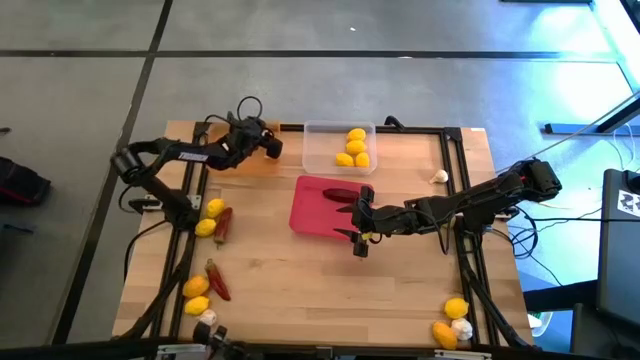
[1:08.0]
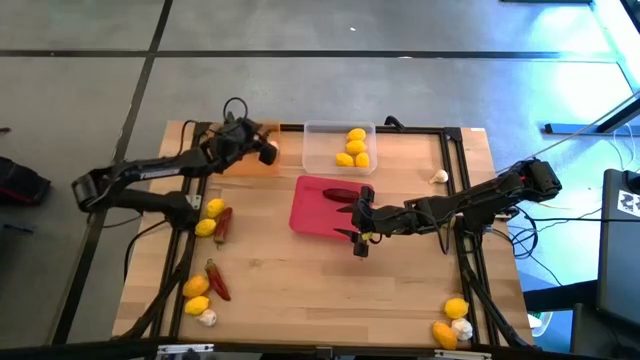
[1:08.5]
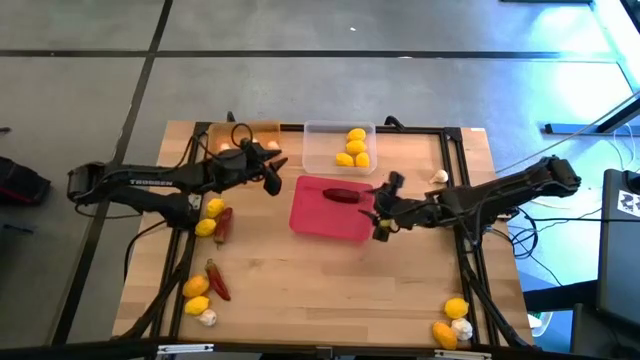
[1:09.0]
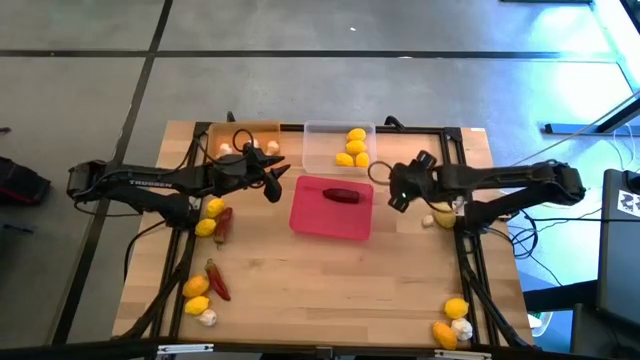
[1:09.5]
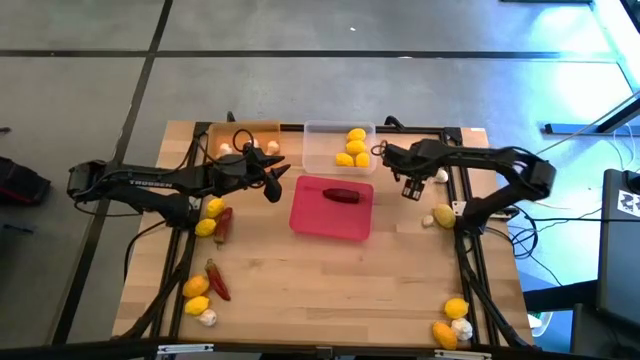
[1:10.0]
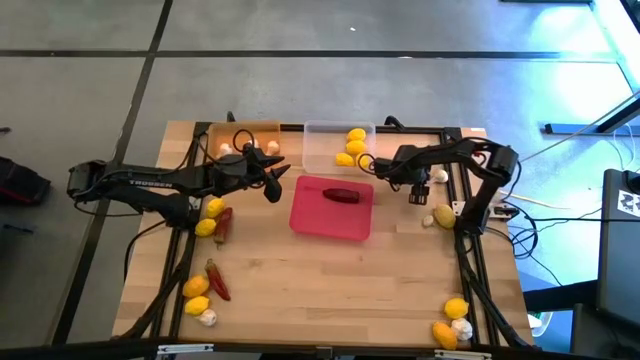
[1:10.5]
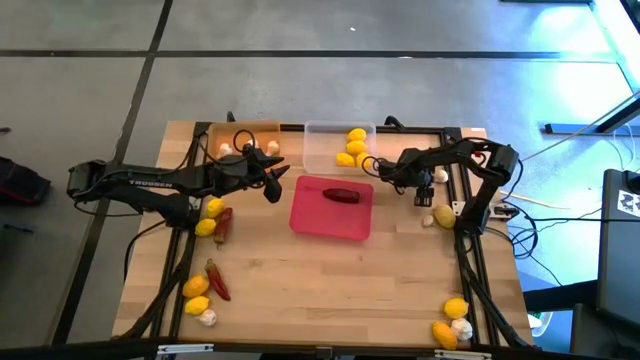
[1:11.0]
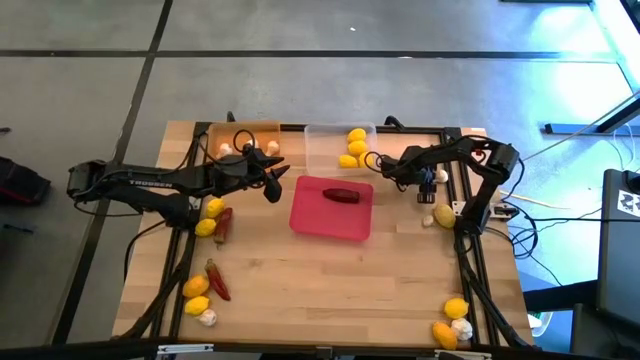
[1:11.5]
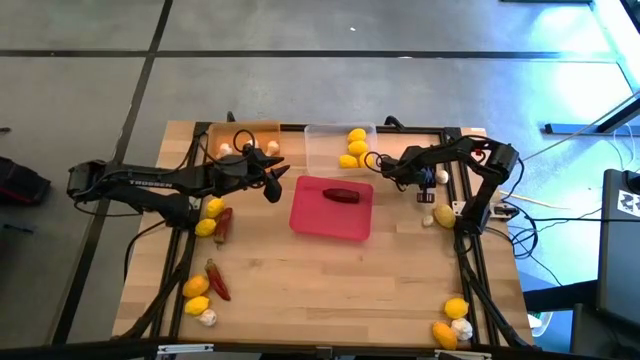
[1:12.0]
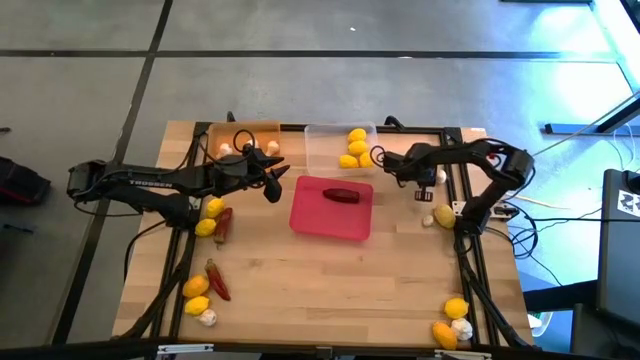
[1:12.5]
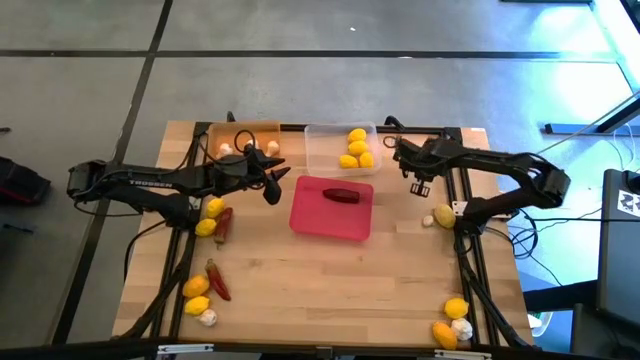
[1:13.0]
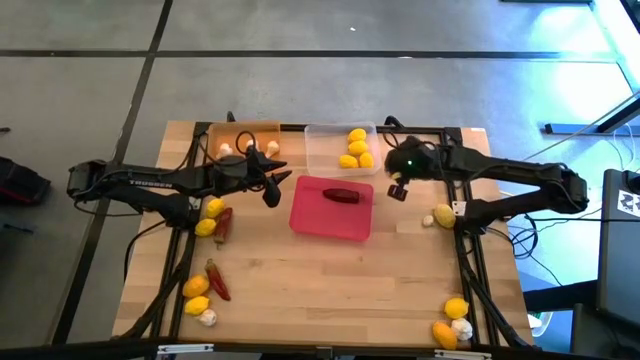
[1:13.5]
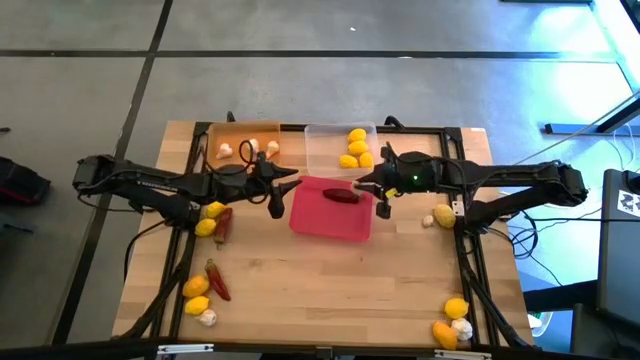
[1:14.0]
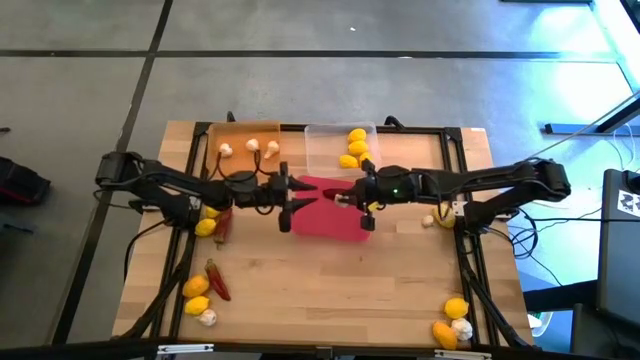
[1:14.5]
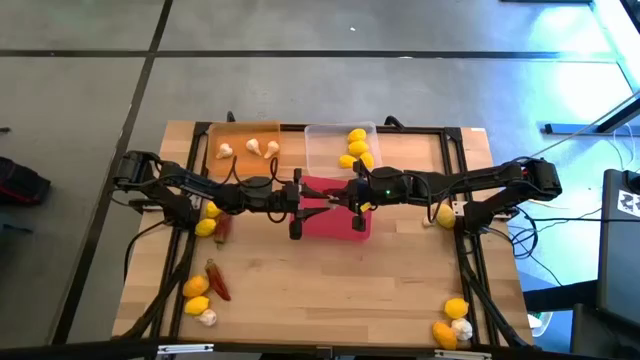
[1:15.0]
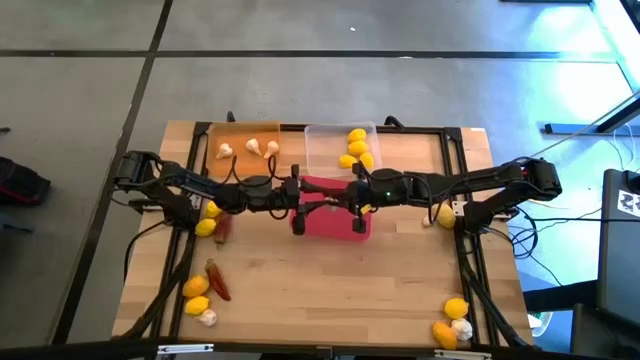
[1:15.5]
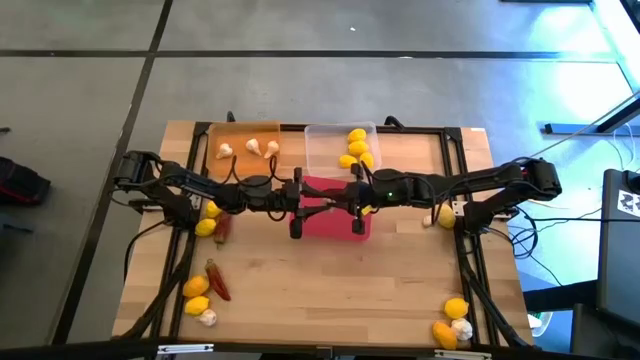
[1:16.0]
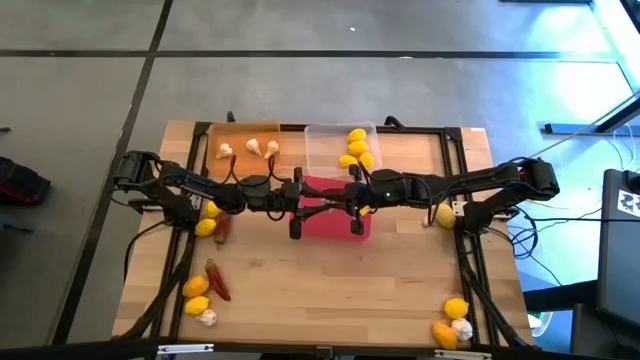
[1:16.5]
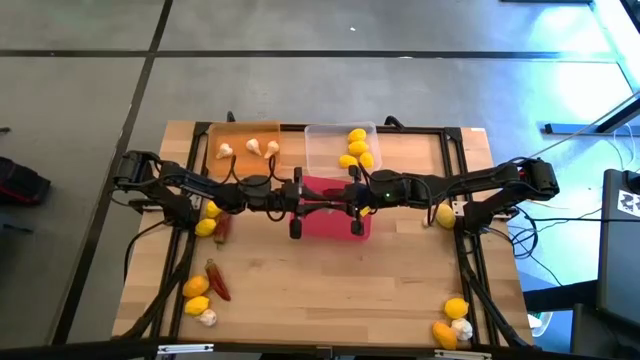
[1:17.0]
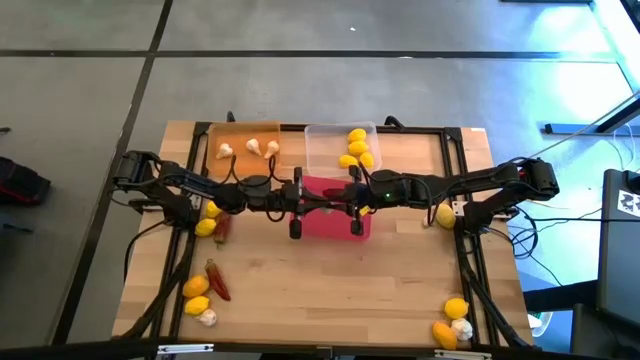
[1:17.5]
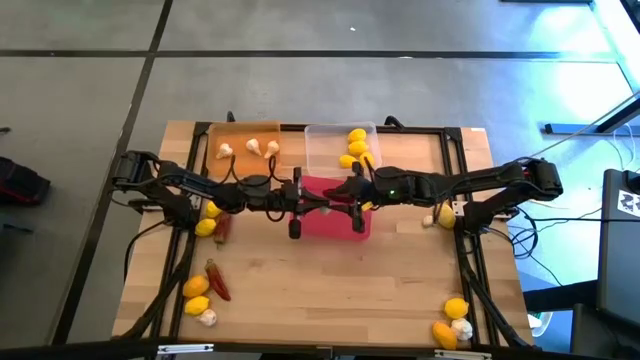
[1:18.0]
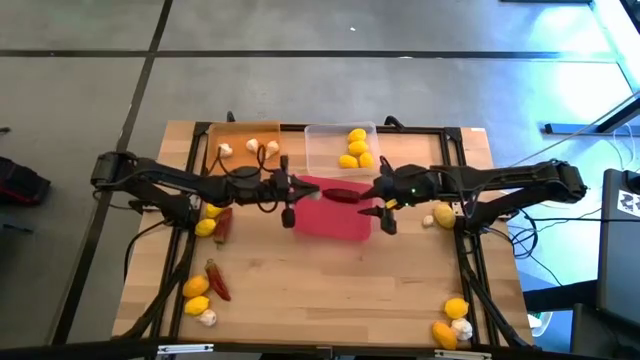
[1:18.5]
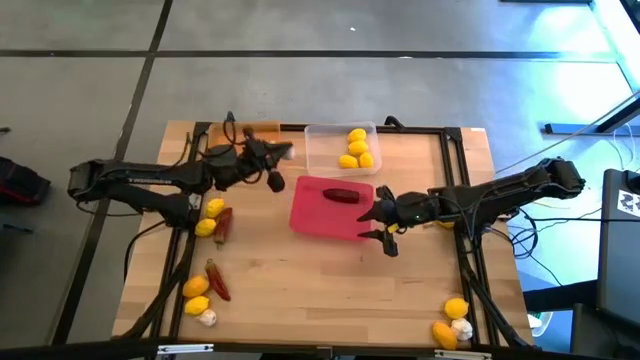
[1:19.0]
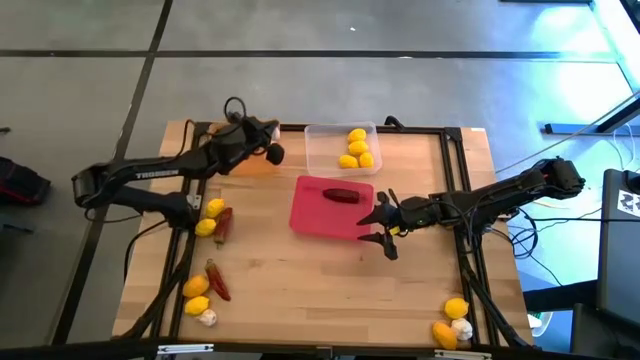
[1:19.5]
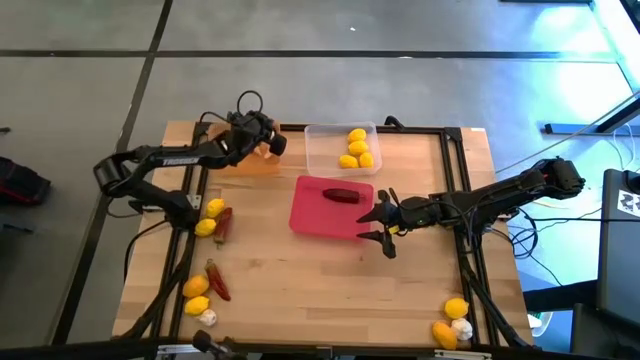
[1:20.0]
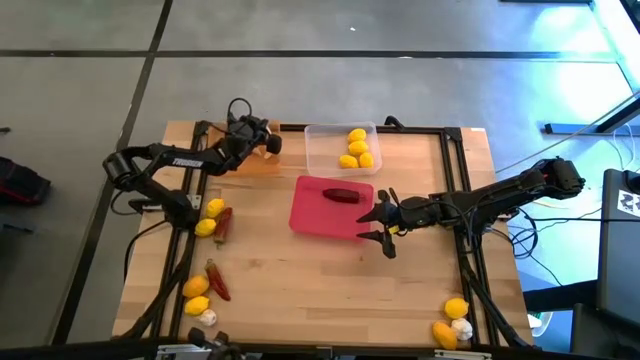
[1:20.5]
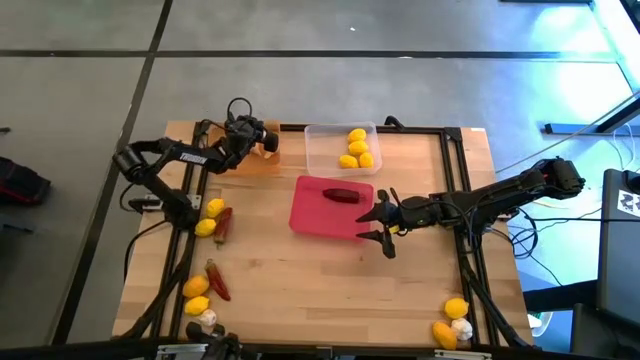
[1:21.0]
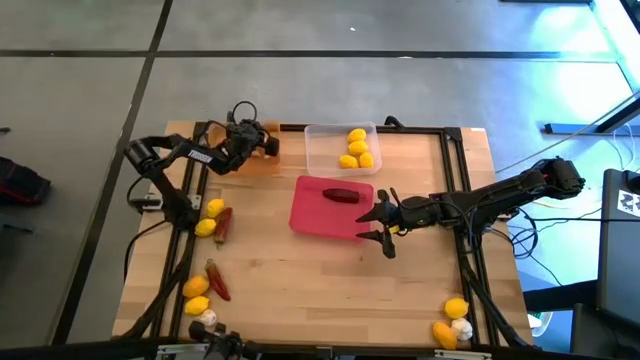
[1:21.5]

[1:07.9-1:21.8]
Task: Sort produce into baskets
Put the white garlic in the orange bin

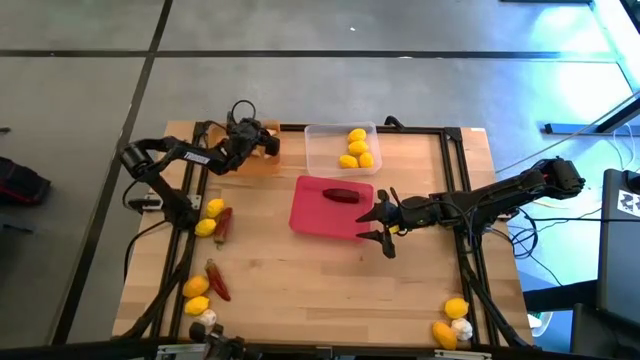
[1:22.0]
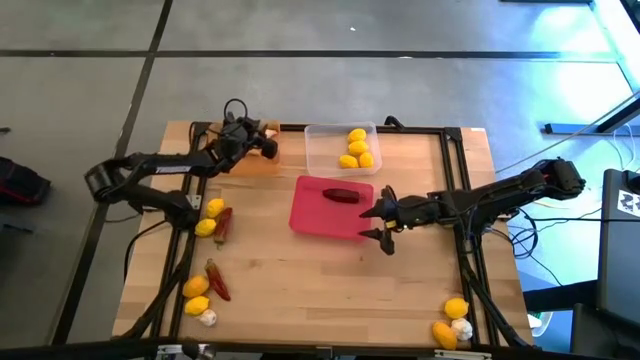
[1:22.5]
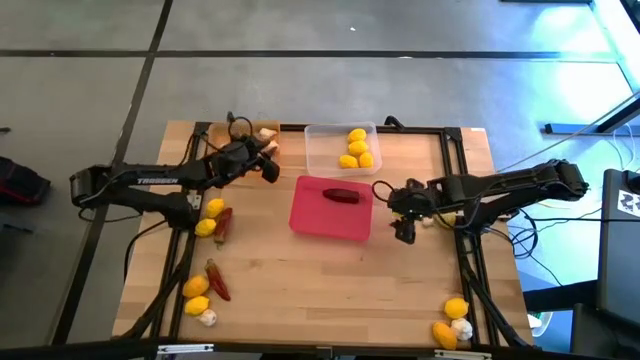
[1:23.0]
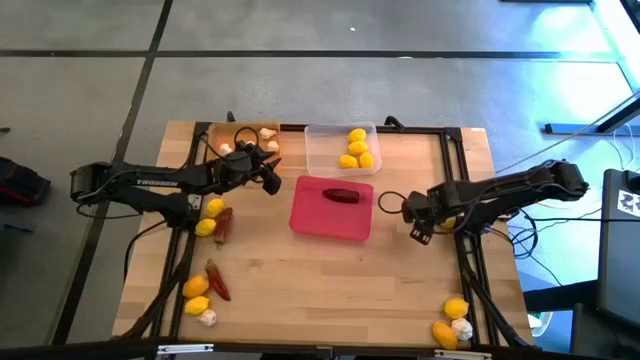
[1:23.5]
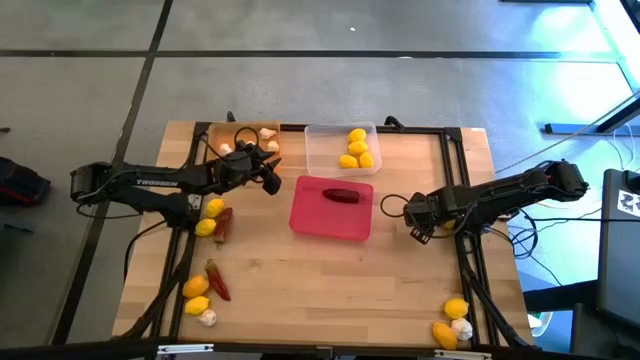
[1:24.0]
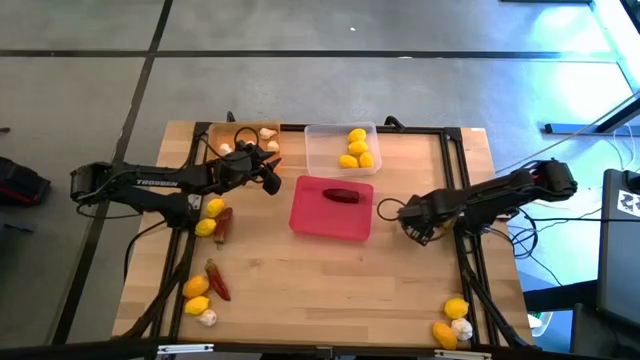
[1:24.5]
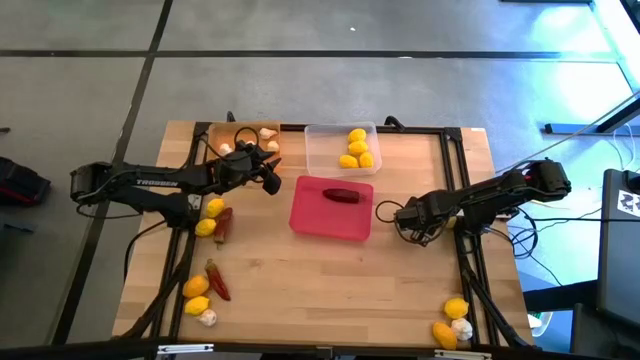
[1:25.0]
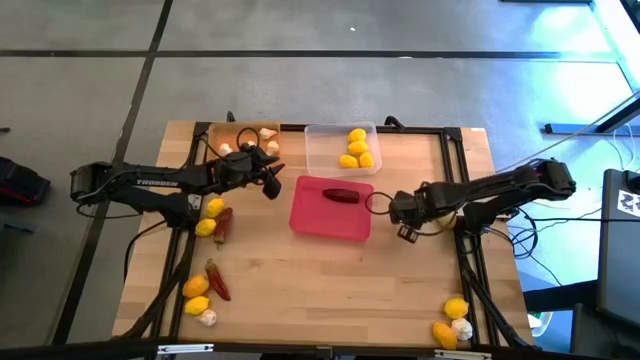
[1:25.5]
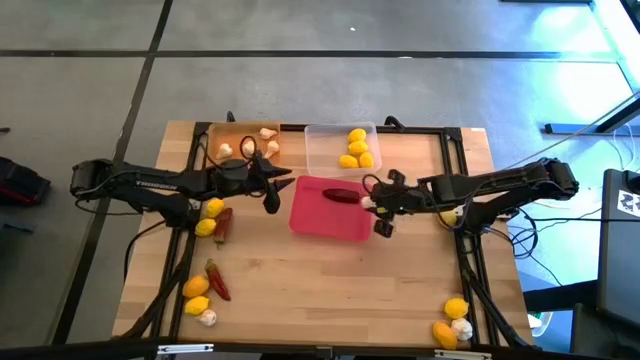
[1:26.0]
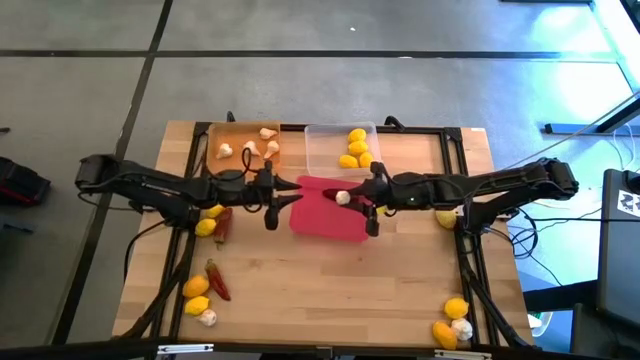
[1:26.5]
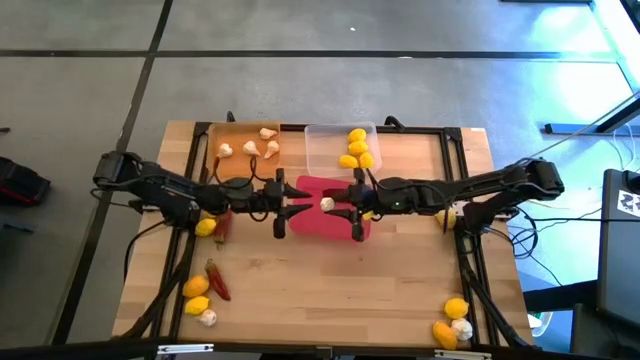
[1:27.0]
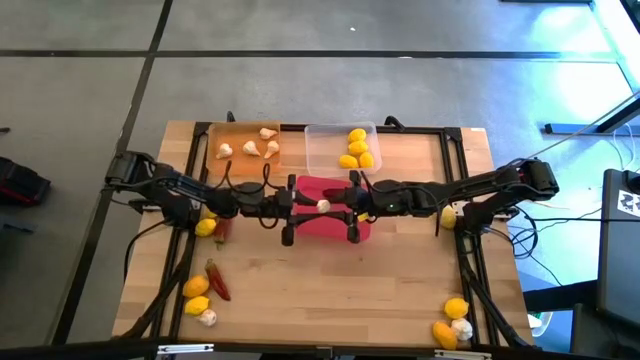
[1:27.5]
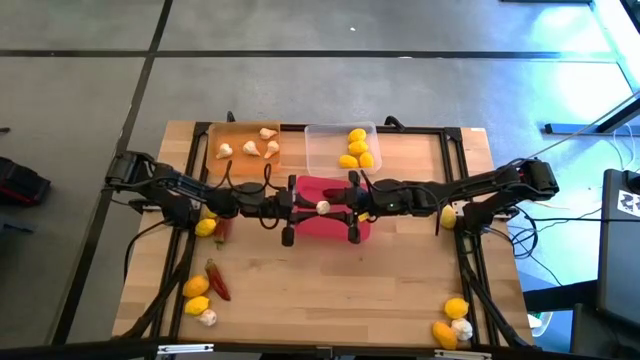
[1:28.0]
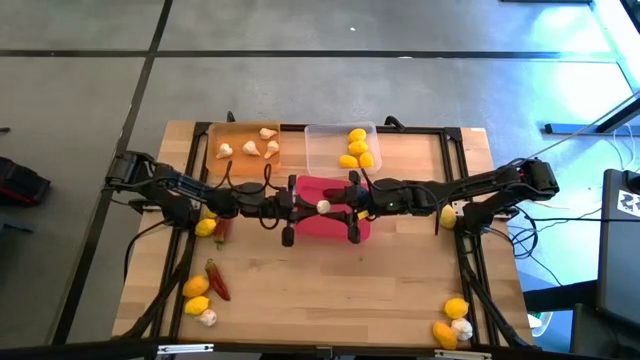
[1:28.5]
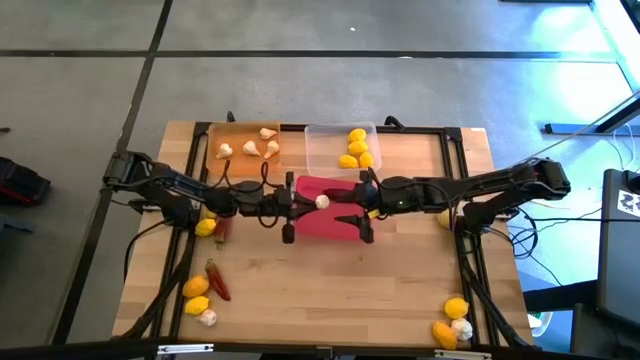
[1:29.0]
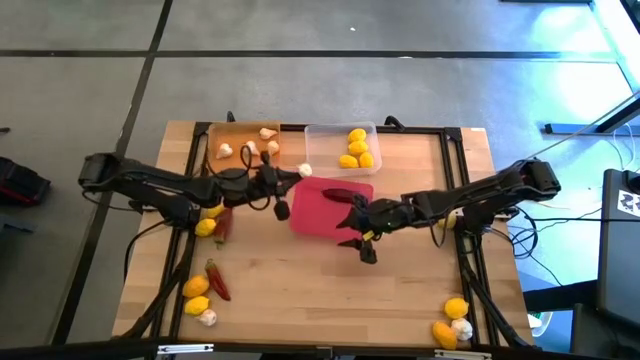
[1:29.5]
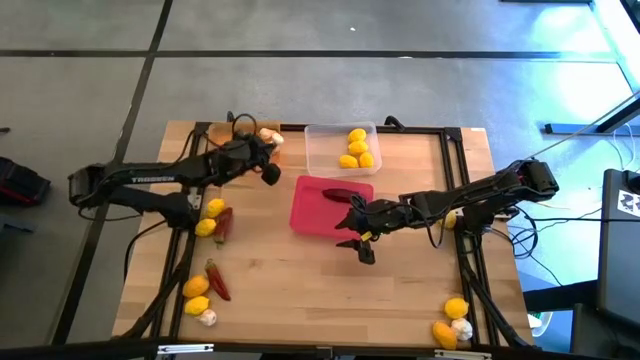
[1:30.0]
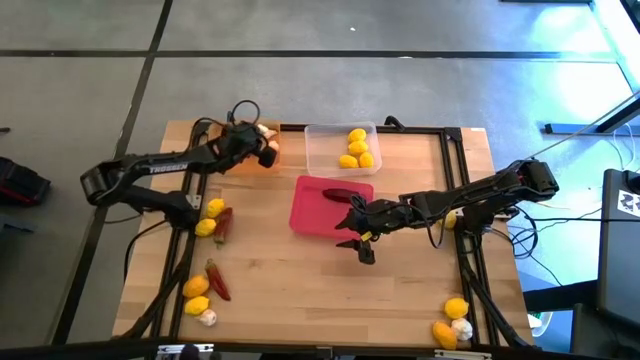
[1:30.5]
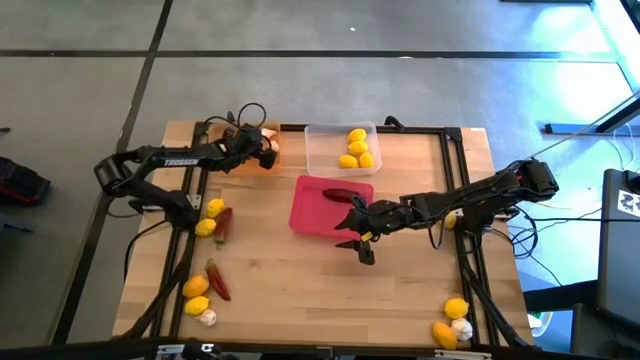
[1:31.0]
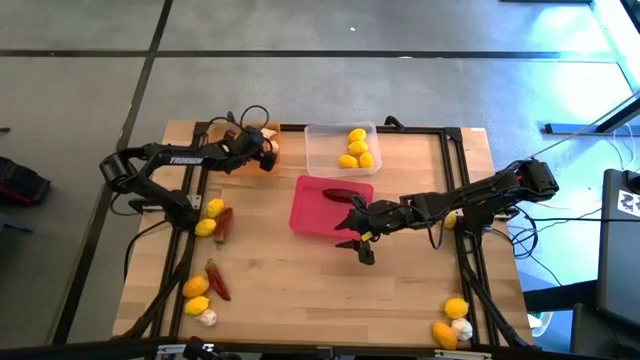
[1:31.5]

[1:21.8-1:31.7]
Put the white garlic in the orange bin
